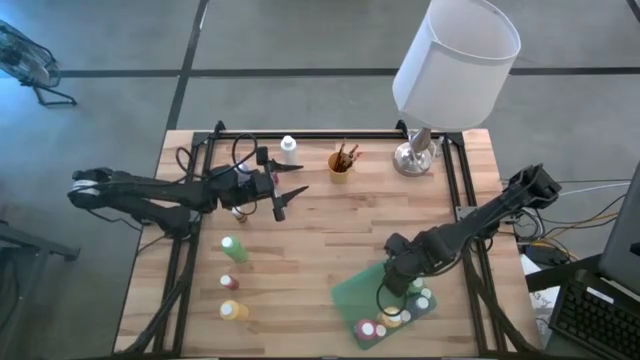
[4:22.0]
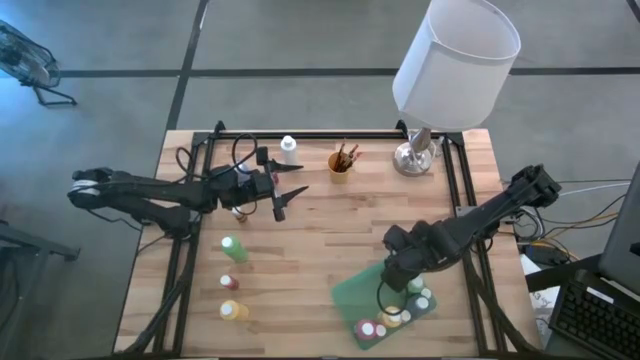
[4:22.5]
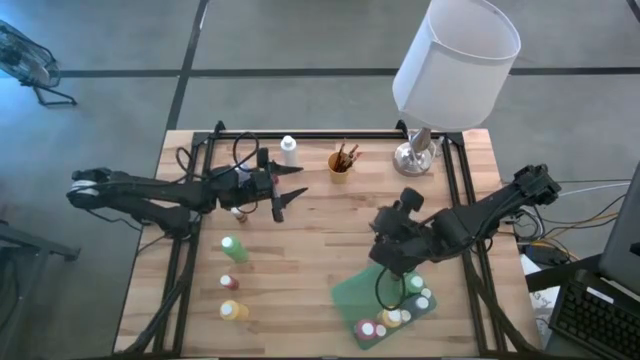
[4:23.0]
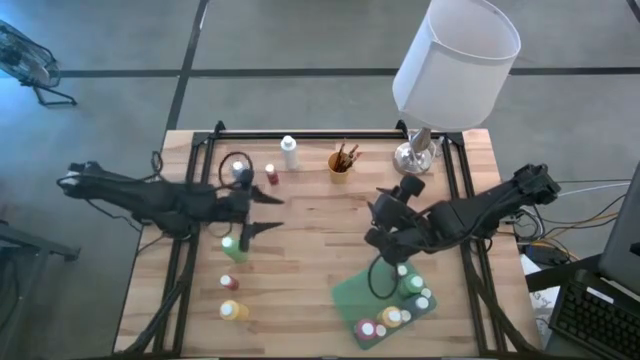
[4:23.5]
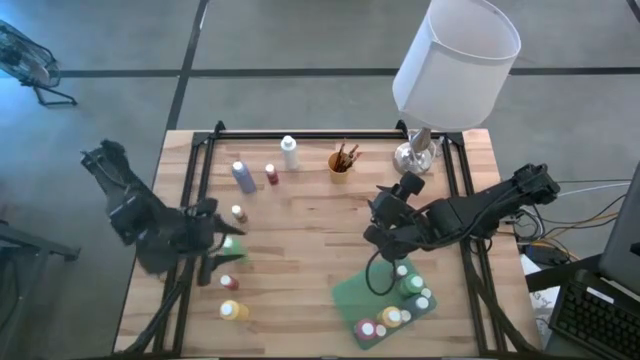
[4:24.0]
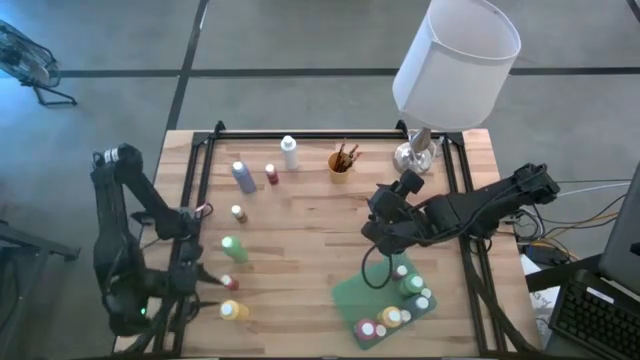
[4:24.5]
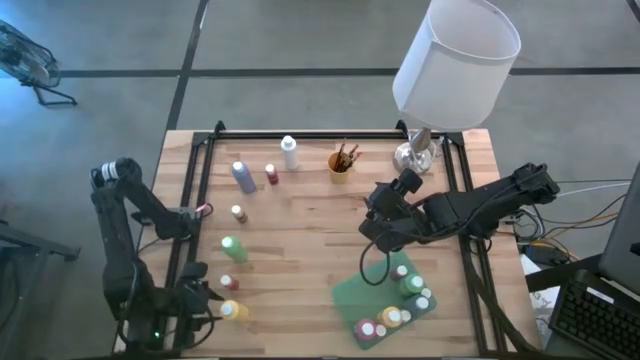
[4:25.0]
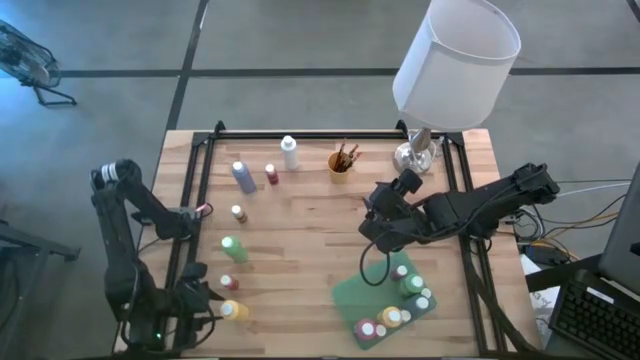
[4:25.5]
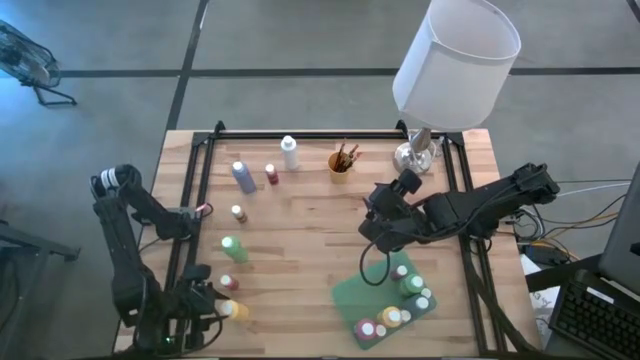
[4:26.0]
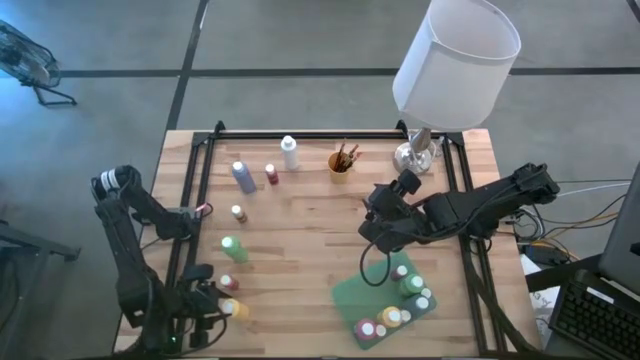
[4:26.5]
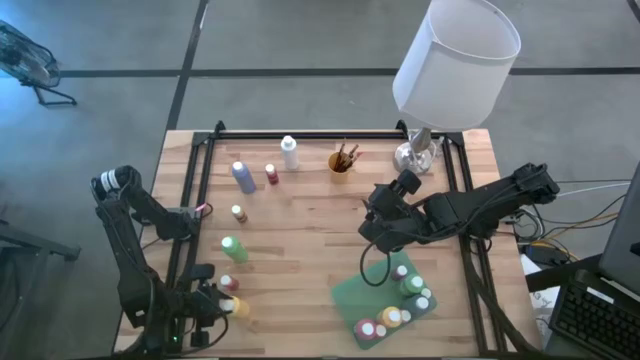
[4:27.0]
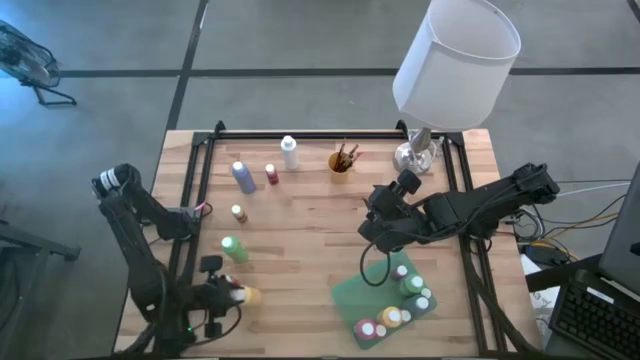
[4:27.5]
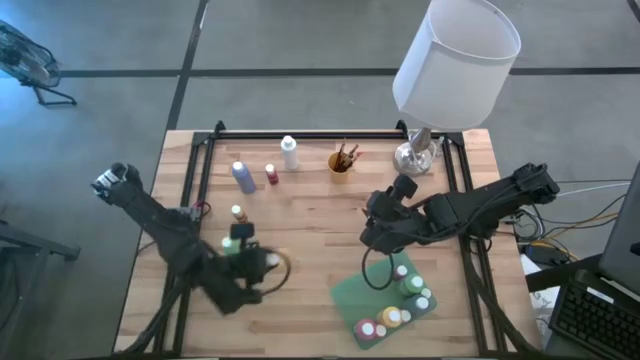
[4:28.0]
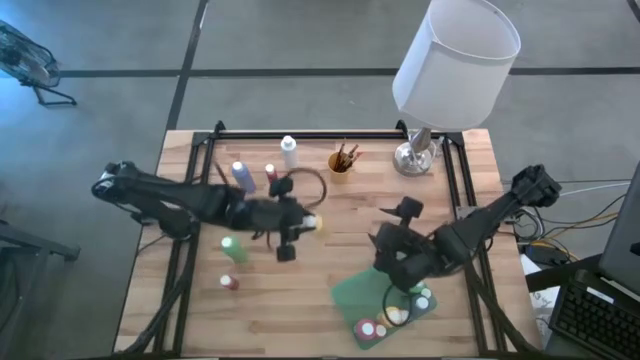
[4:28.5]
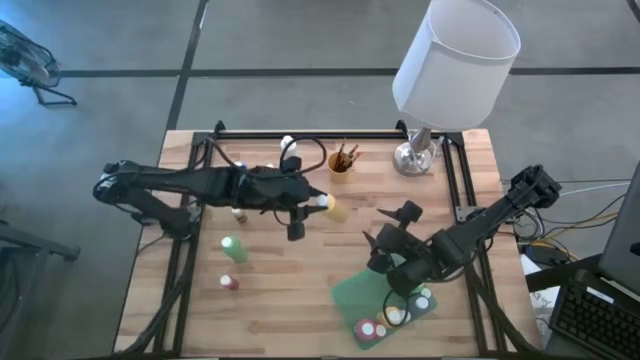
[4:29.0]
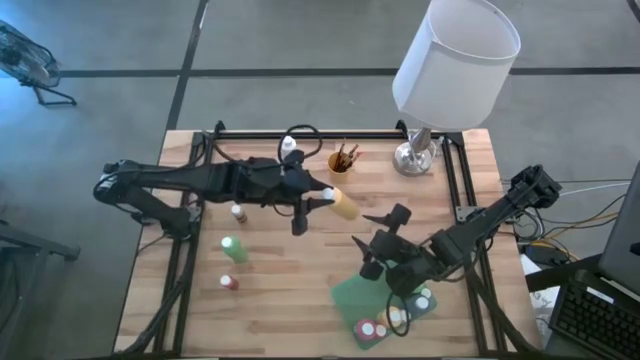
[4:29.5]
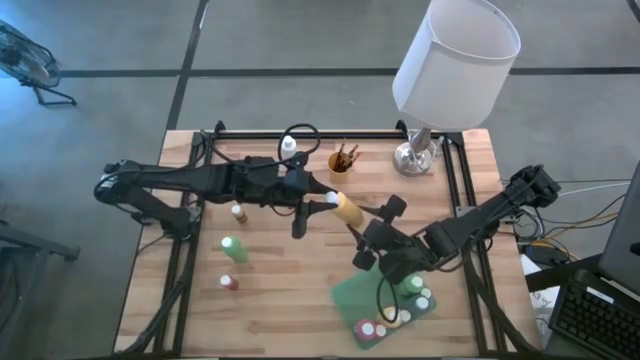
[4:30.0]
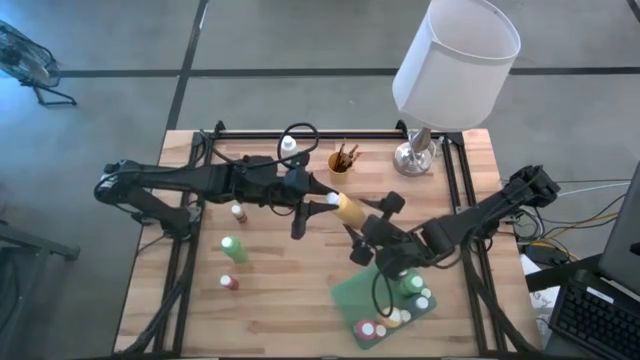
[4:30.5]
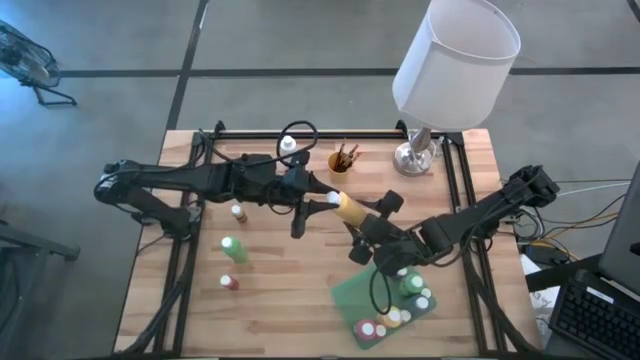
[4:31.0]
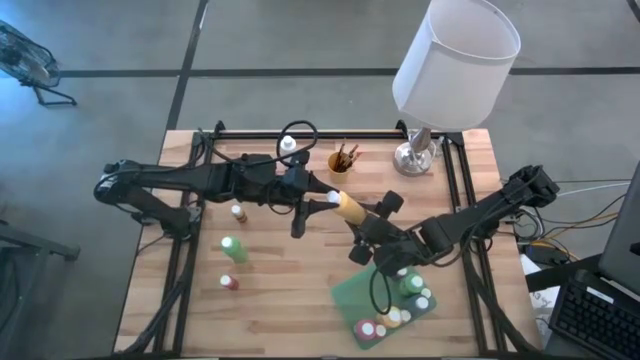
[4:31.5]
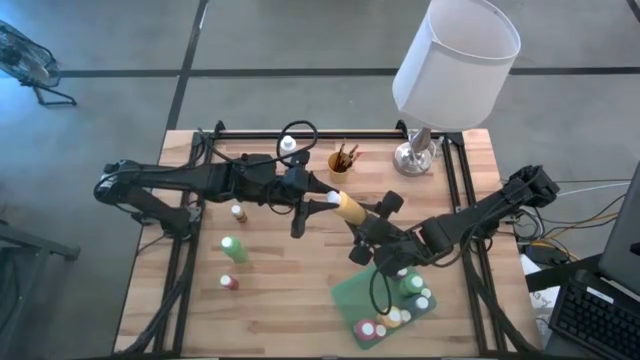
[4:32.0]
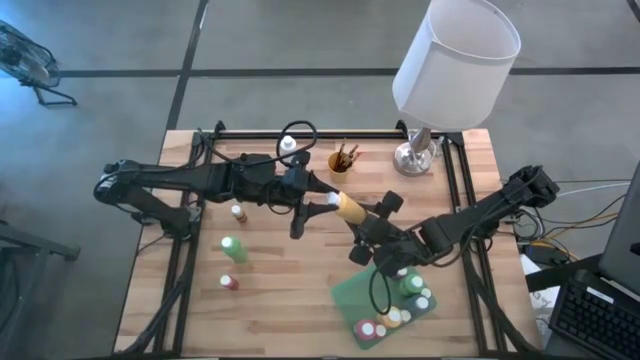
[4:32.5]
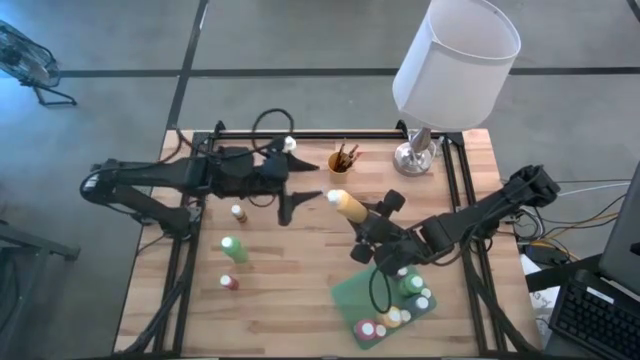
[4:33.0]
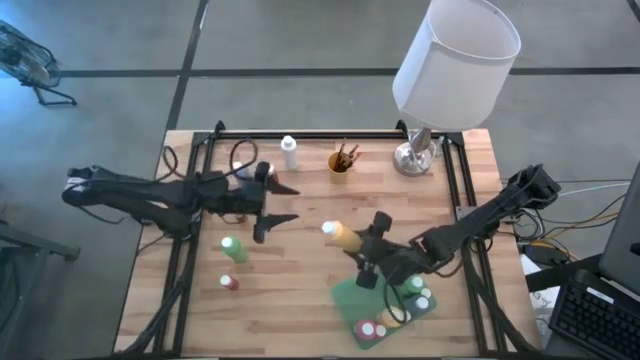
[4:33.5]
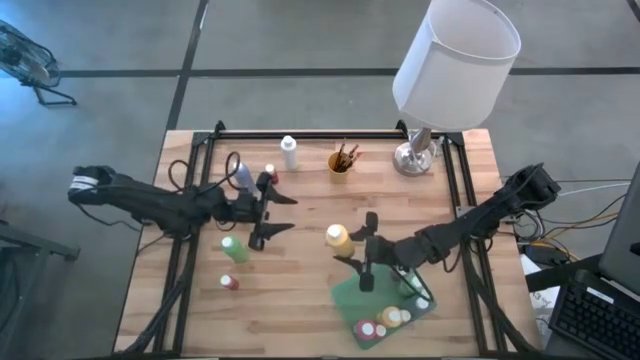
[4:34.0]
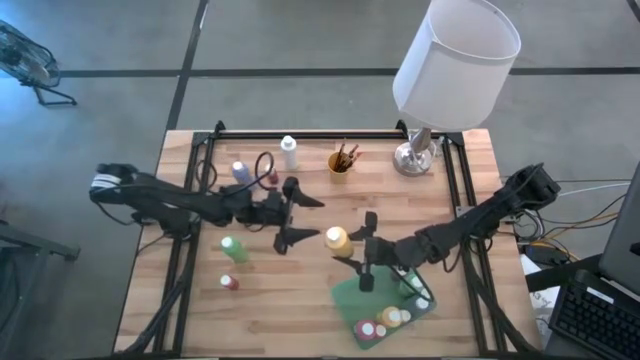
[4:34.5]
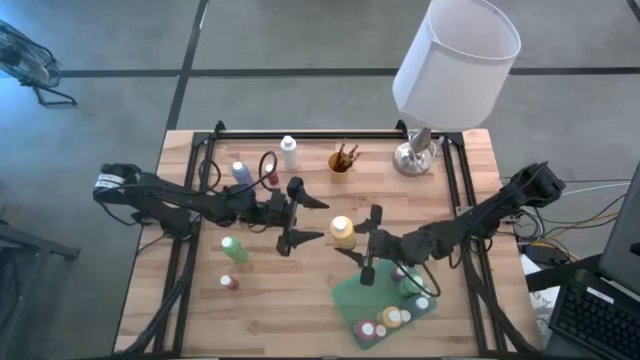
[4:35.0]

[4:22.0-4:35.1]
Task: Pick & Place Paint Supplies
Put the yellow paint bottle into the green bin

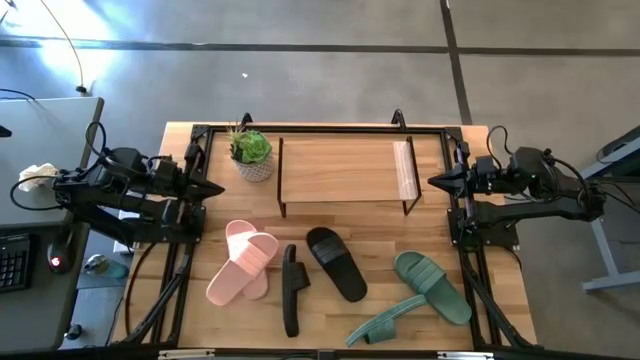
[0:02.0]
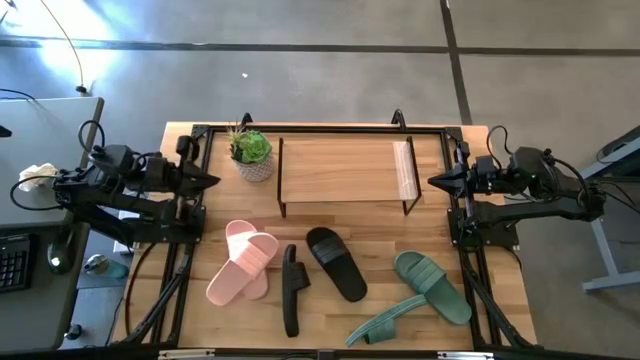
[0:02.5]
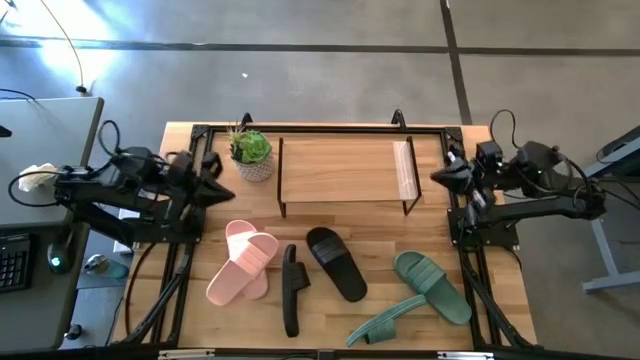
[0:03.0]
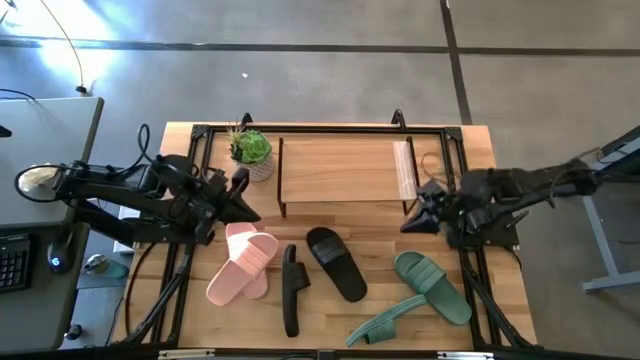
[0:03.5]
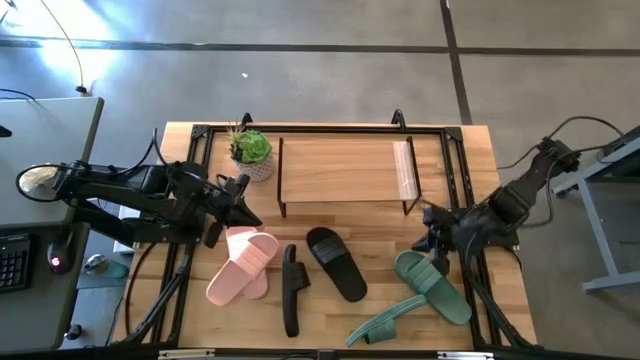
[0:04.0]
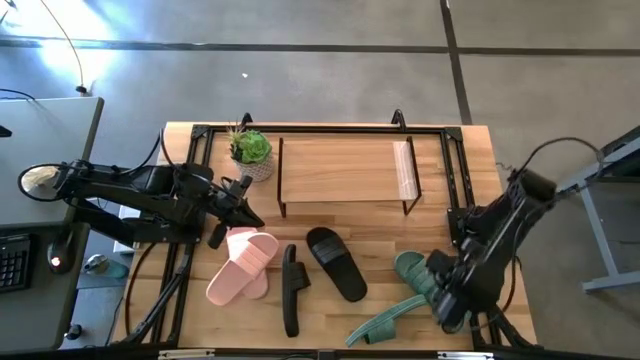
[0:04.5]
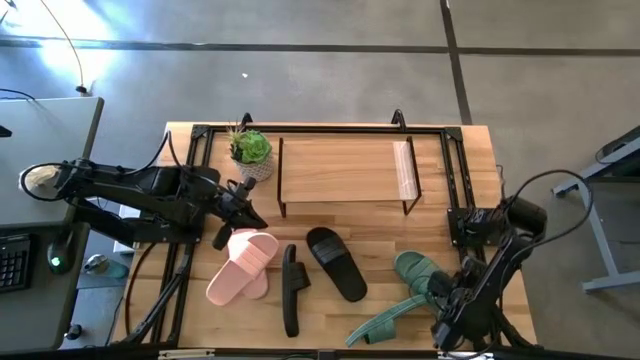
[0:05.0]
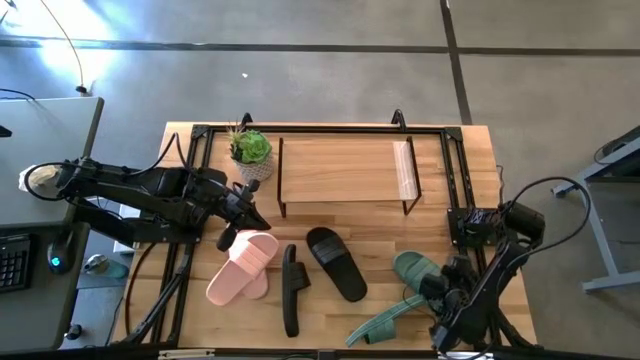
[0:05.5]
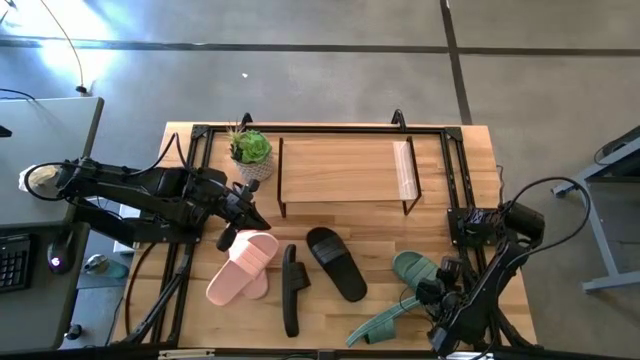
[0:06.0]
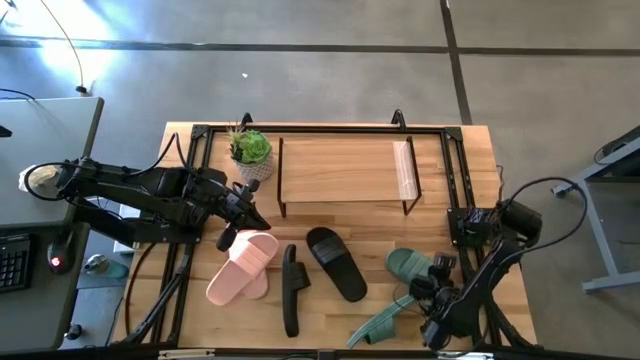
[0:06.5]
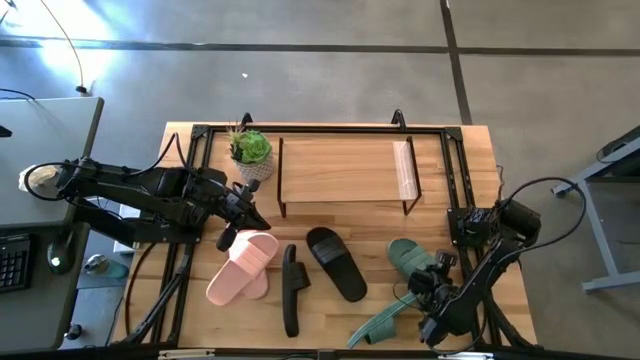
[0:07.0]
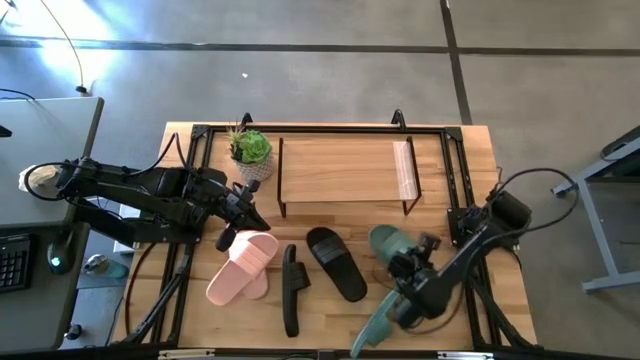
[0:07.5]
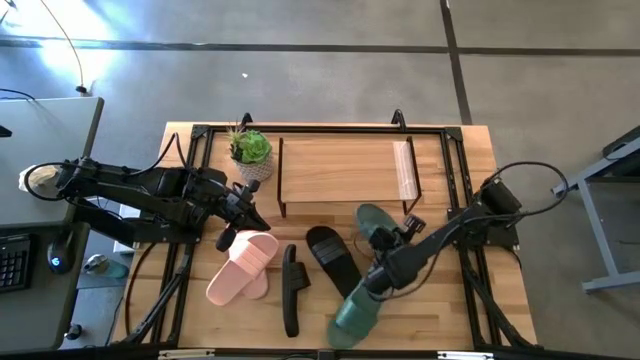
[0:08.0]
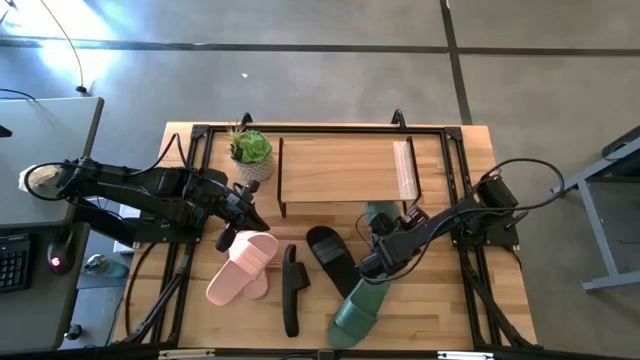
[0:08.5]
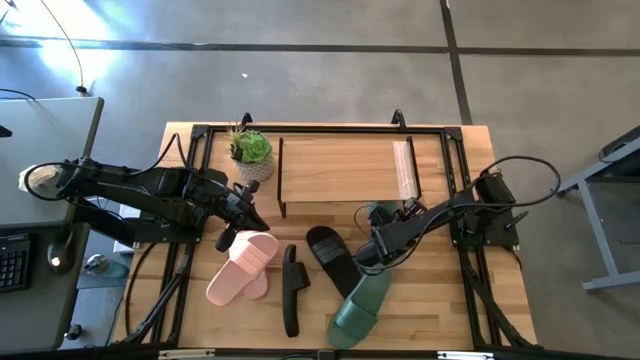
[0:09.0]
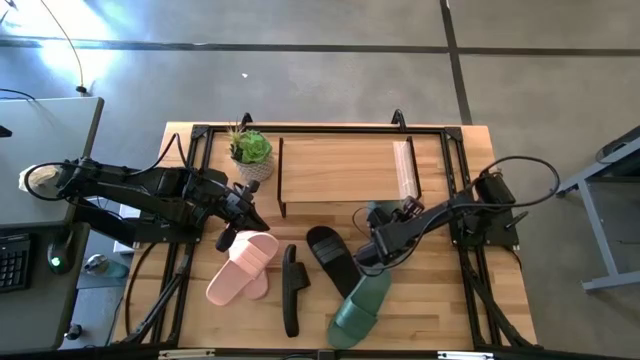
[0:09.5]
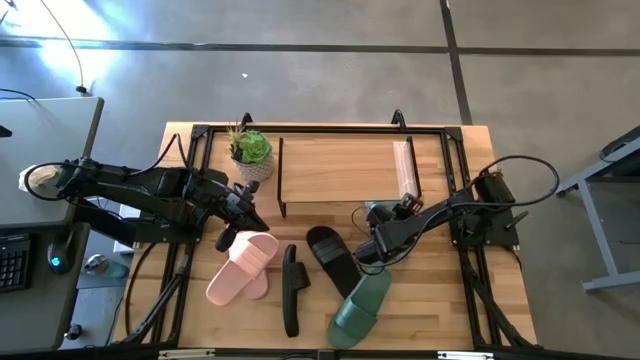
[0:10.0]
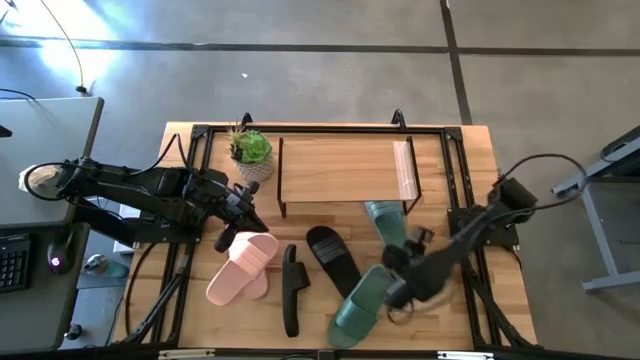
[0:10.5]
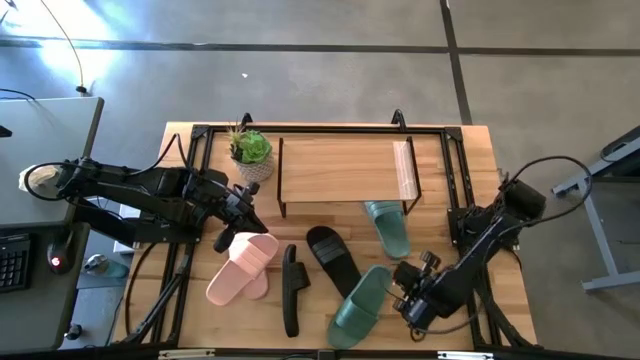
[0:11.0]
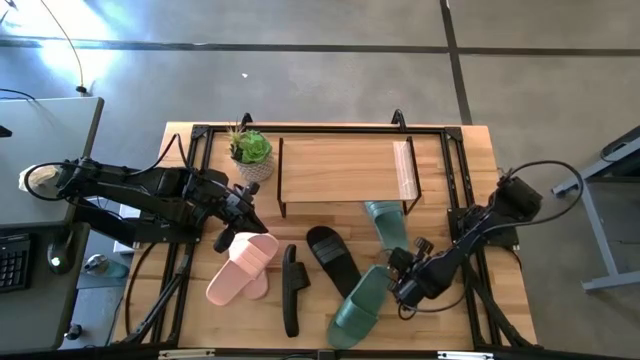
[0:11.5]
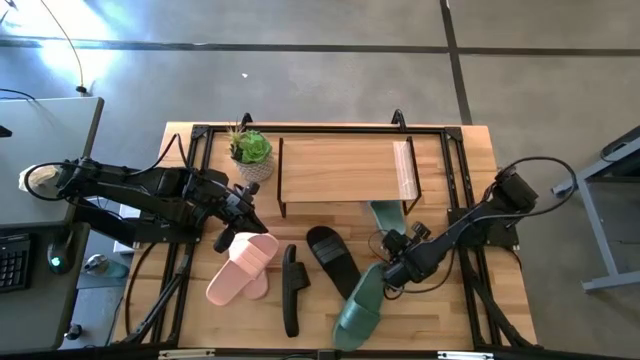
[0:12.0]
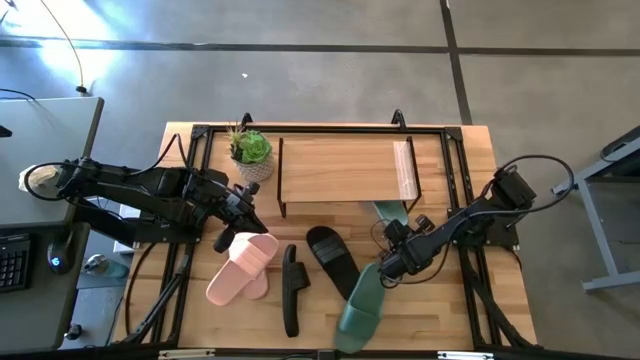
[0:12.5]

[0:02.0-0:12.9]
Task: Pick and place slides into the shelf
Put the right green slipper under the shelf
